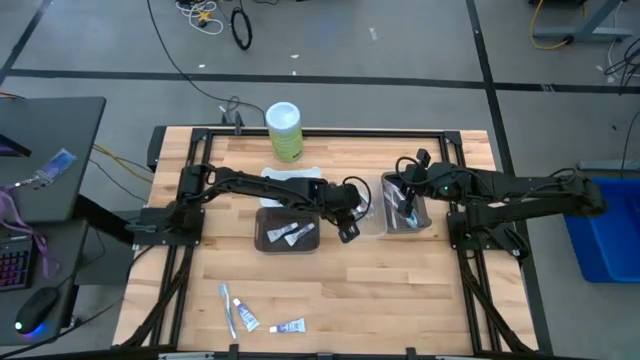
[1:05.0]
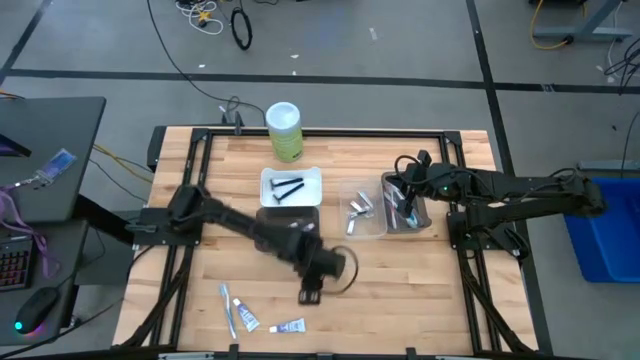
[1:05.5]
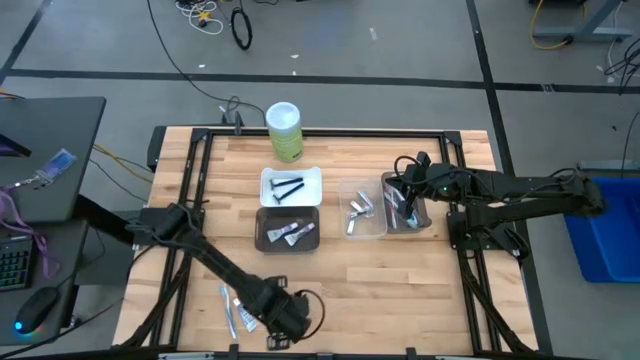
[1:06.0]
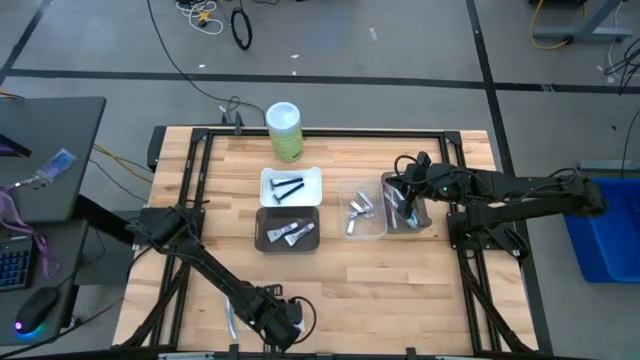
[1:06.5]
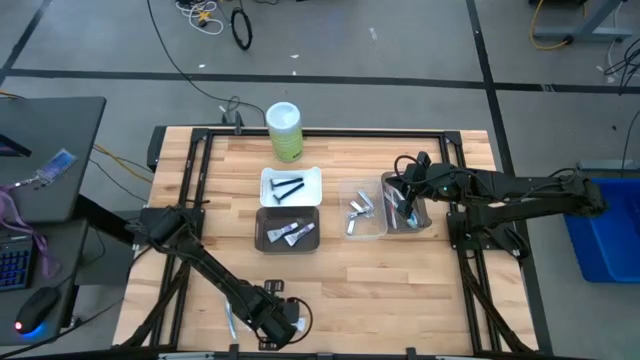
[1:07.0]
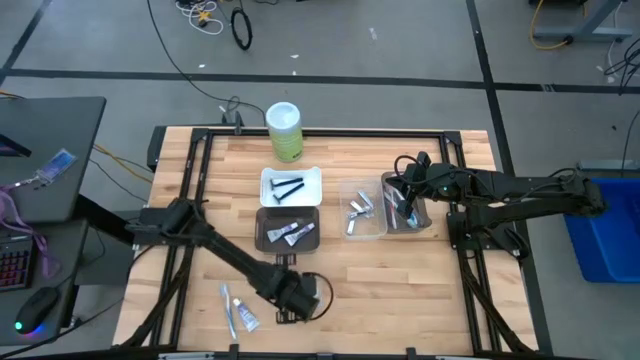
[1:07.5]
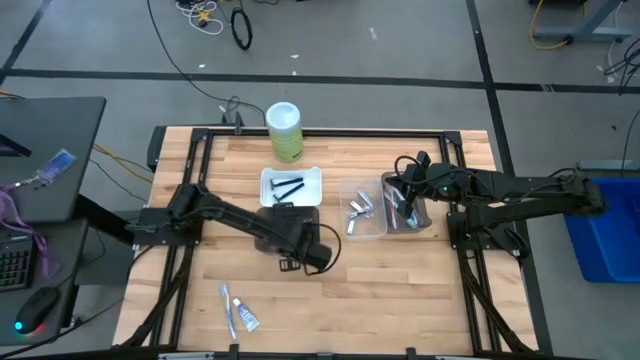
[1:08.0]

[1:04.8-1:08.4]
Task: Pick & Place Travel size toiletries
Put the white toothpaste into the left black bin

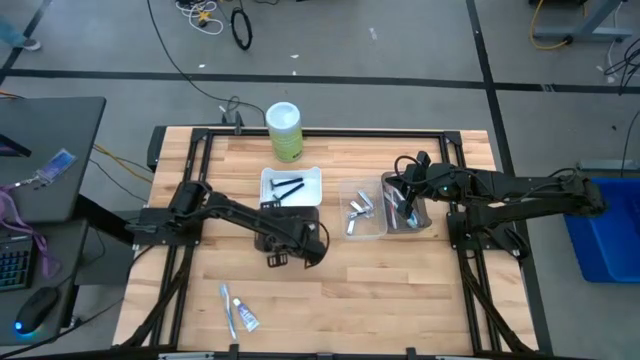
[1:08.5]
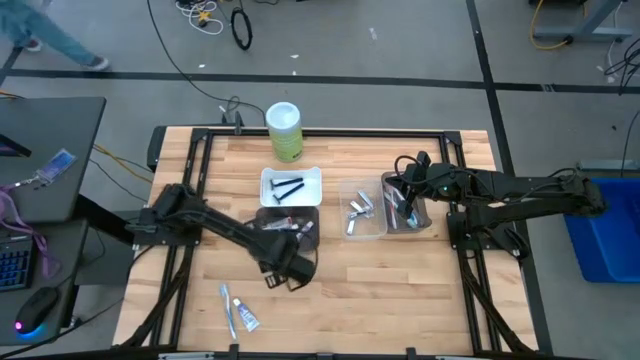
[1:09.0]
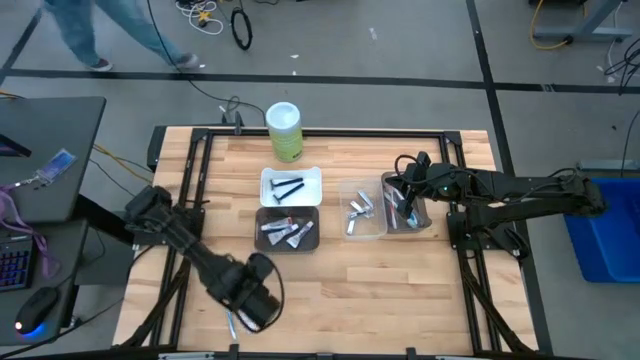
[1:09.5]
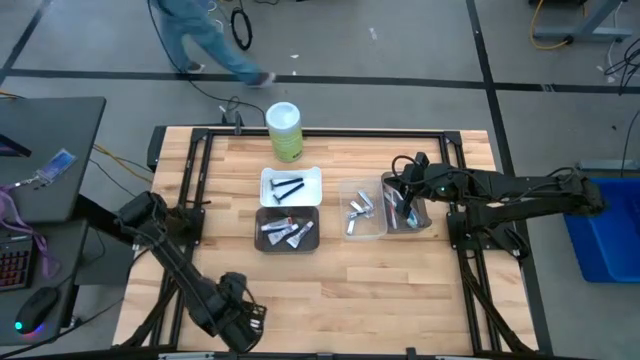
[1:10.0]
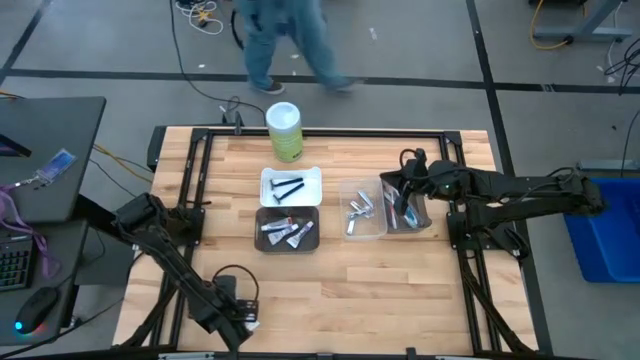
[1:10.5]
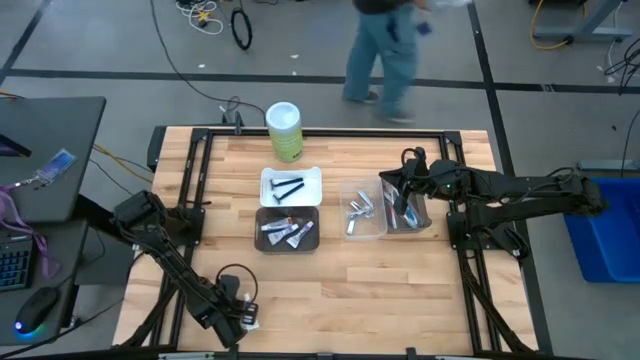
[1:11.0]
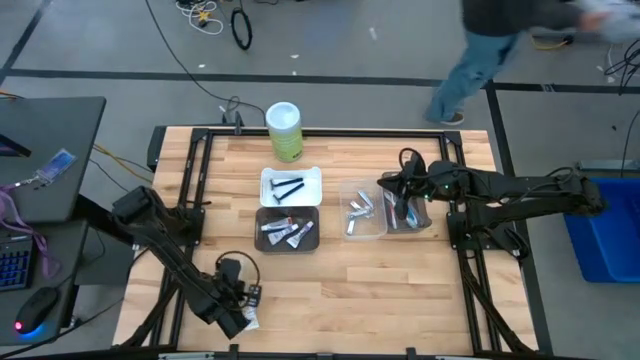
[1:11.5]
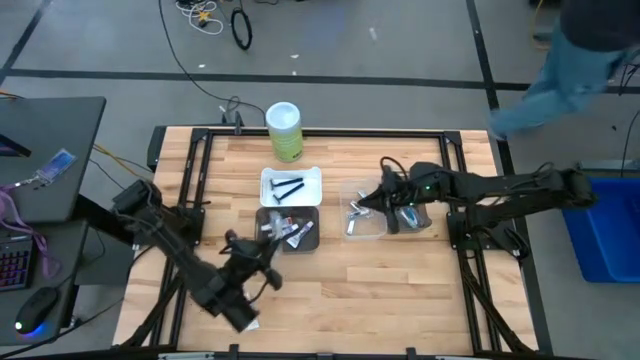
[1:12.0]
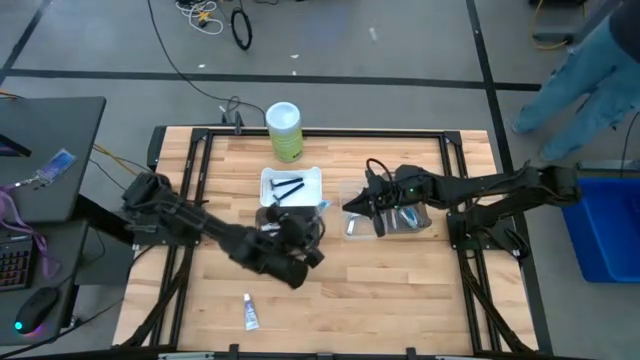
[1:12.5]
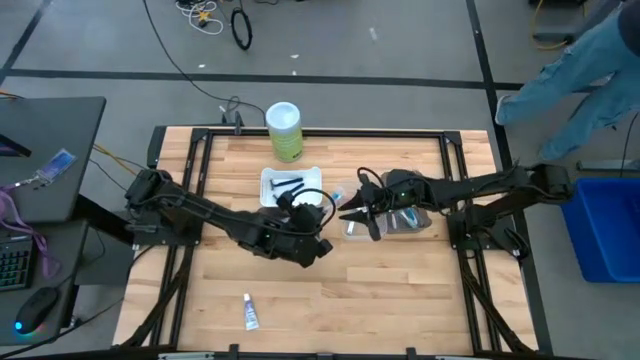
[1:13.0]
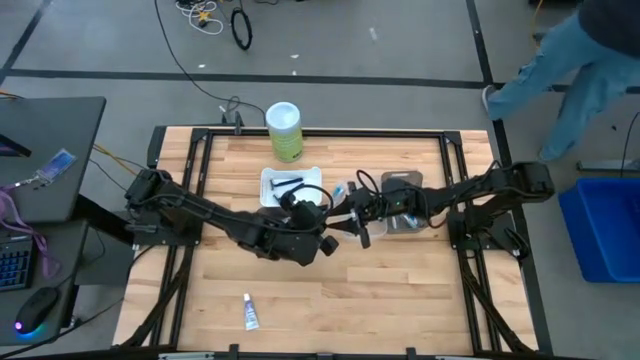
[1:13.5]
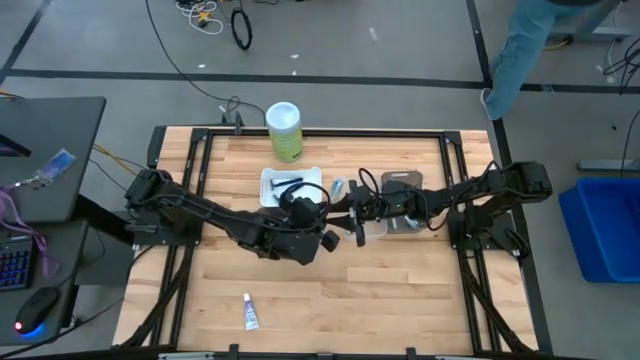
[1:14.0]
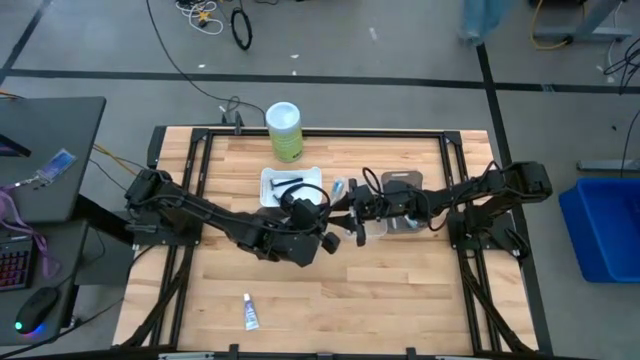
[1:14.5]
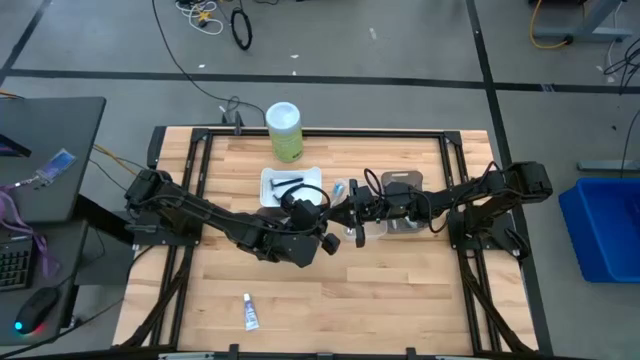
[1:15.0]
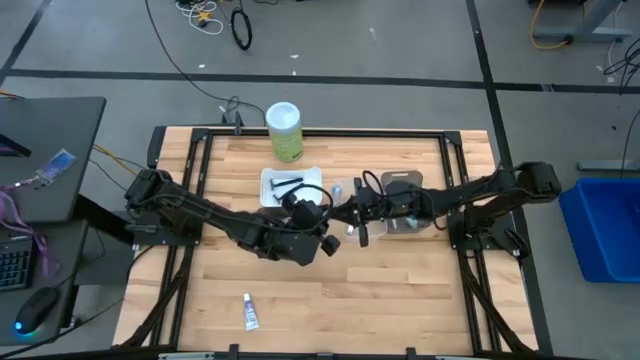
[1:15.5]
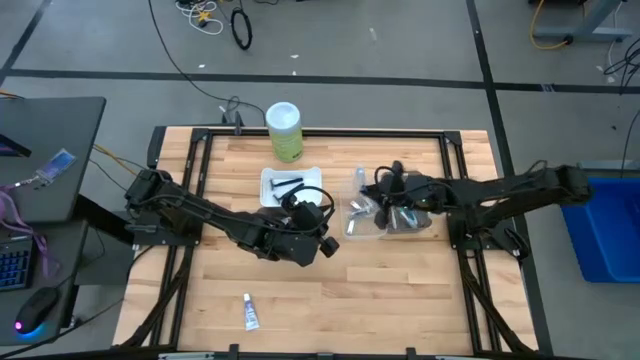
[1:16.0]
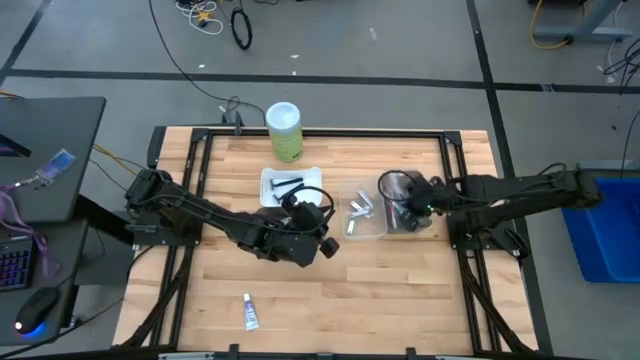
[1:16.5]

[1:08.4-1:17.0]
Put the blue toothbrush into the right black bin

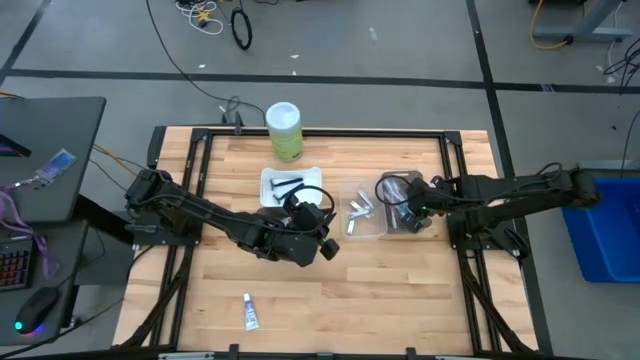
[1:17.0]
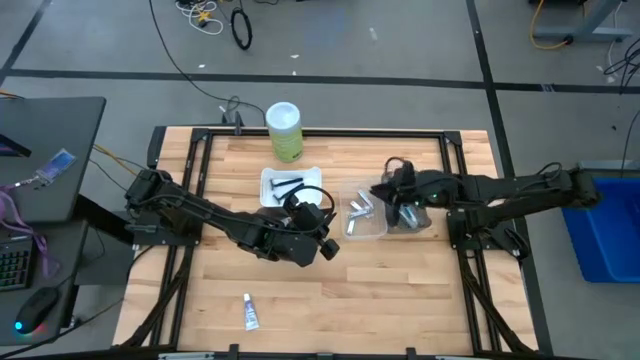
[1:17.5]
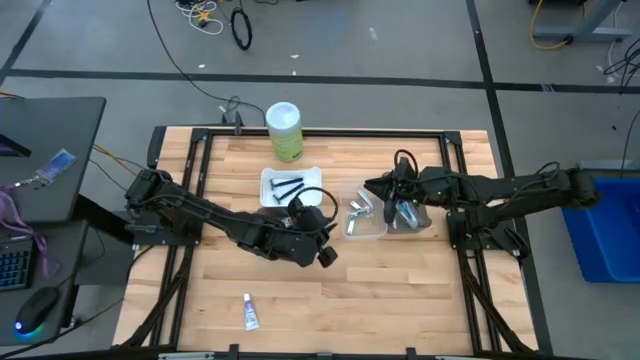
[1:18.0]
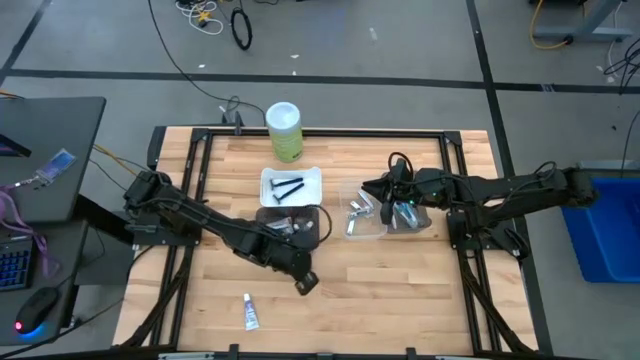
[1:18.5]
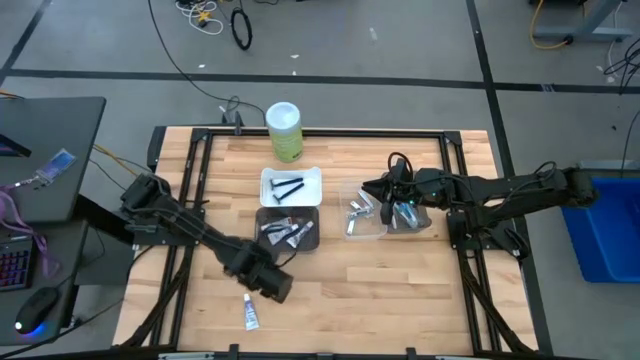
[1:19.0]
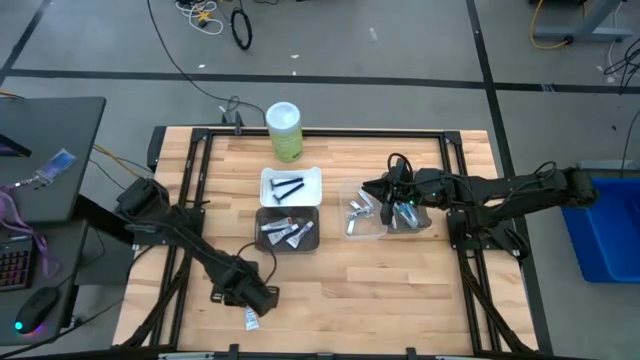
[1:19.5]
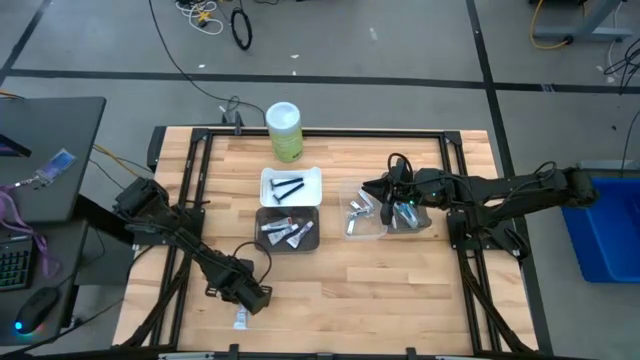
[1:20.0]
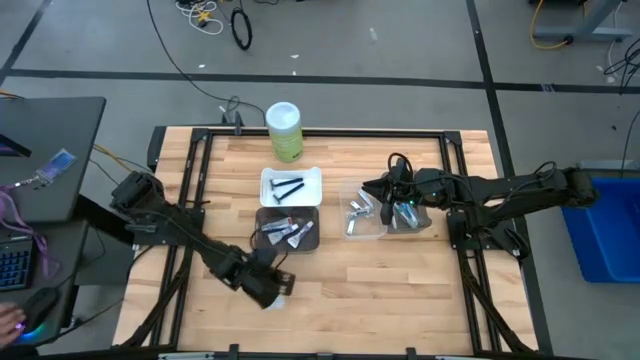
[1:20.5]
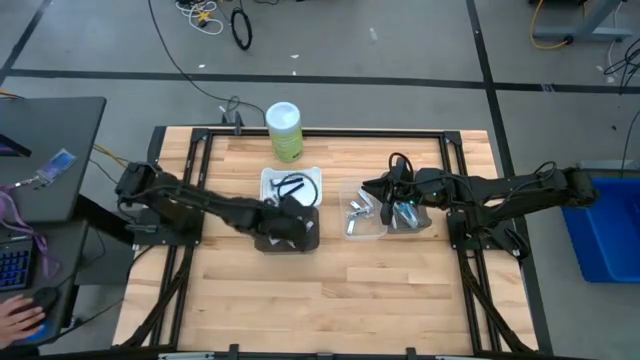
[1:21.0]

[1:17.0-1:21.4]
Put the white toothpaste into the left black bin

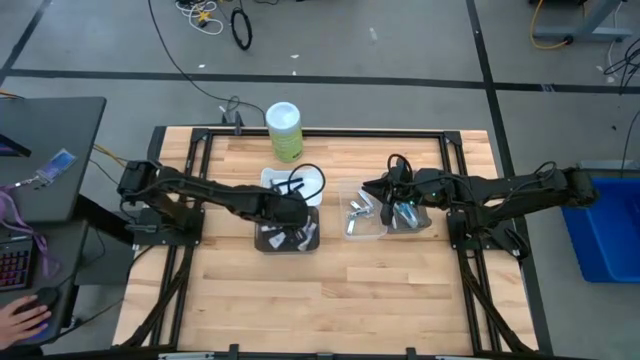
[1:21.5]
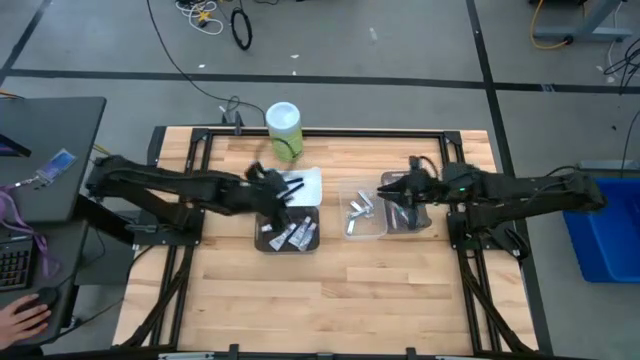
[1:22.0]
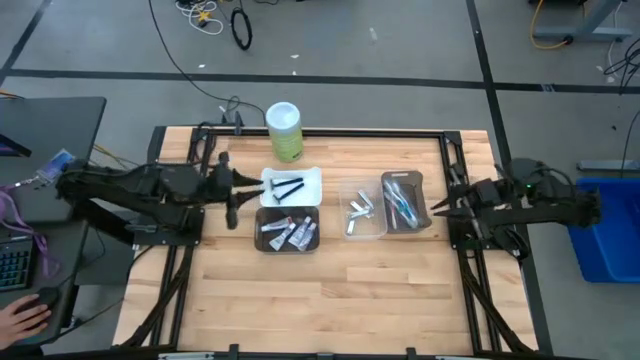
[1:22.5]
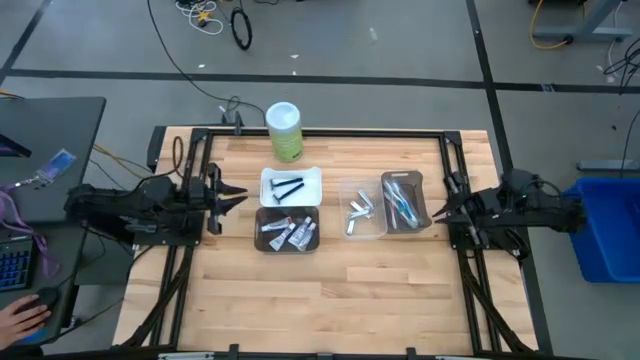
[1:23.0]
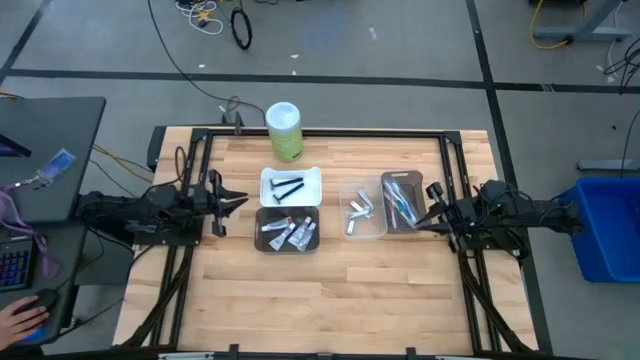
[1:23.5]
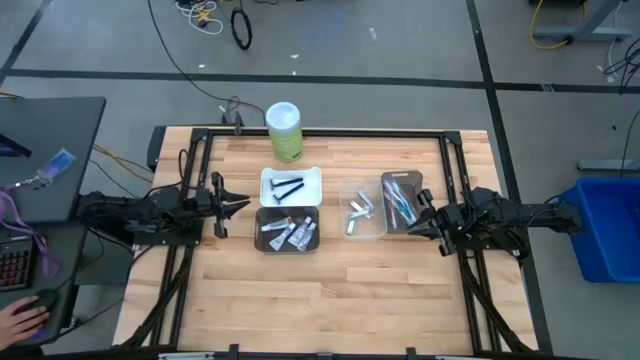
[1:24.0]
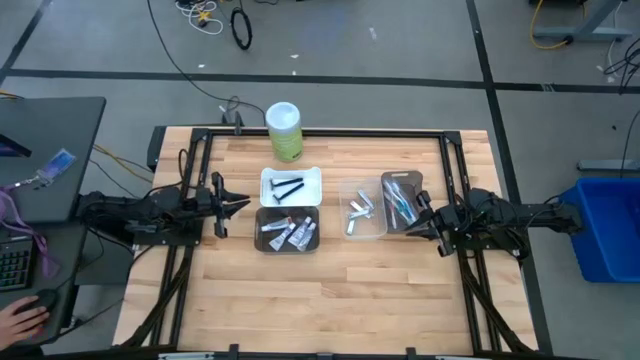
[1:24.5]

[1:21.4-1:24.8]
Return to Home Position
